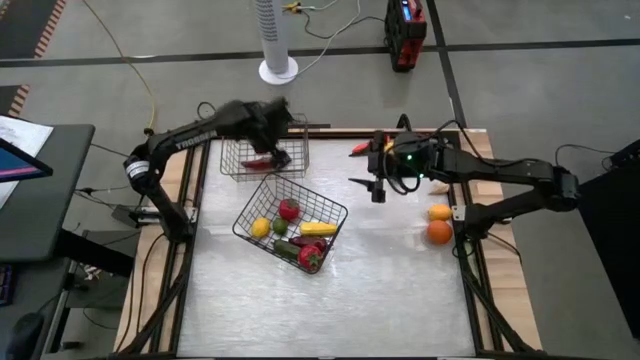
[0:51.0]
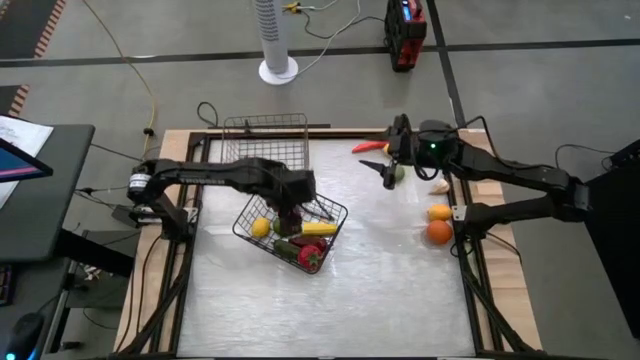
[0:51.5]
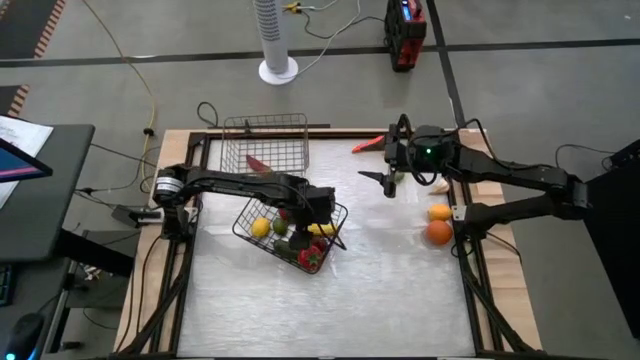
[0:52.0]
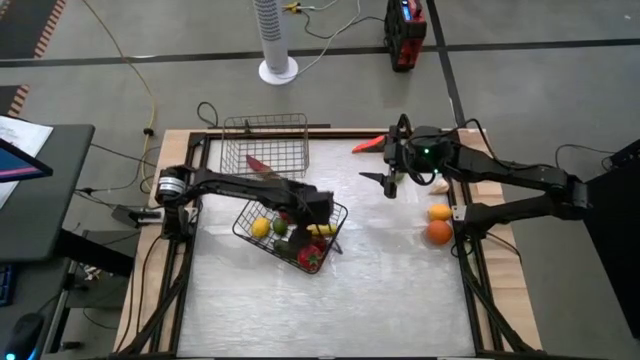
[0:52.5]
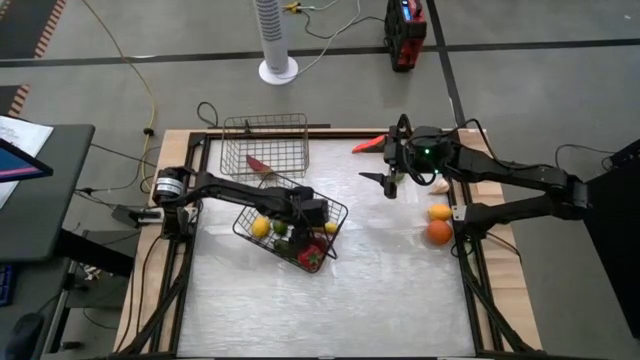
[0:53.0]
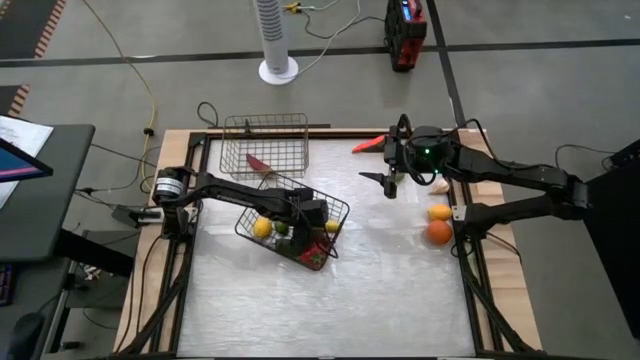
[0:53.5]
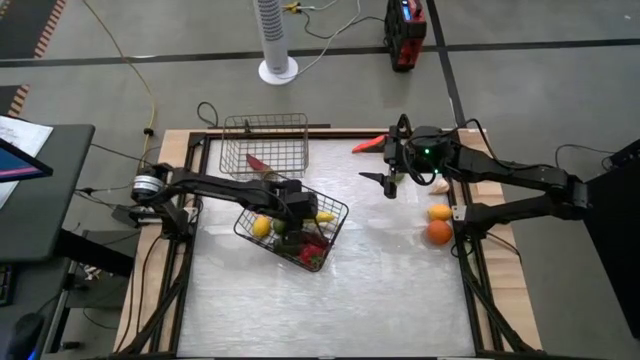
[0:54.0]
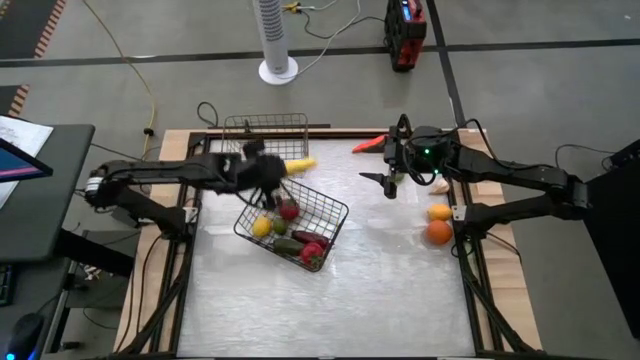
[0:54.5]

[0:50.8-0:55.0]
Task: Sort produce into baskets
Put the yellow corn into the top wire basket

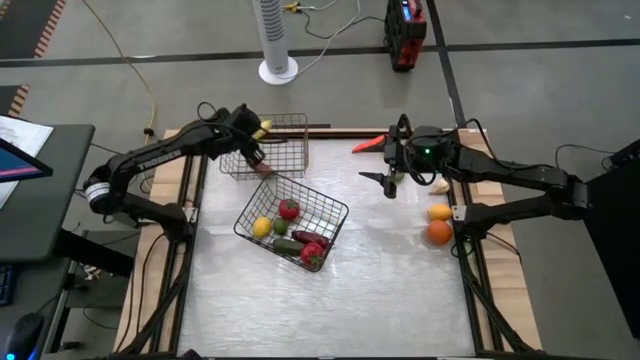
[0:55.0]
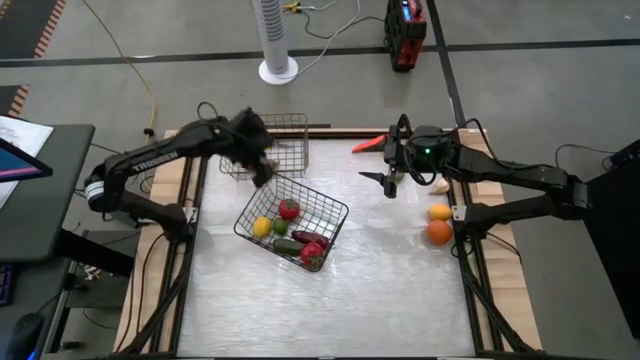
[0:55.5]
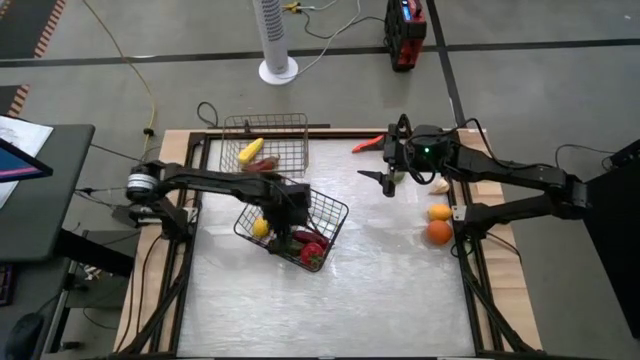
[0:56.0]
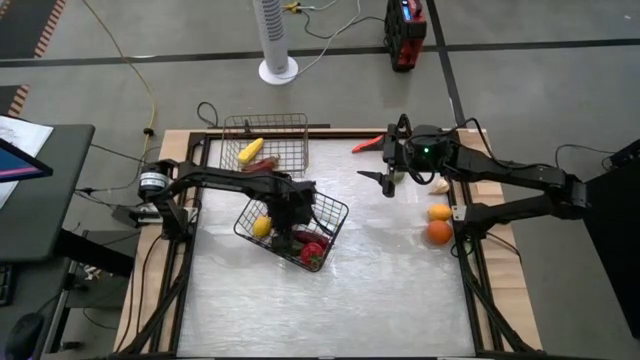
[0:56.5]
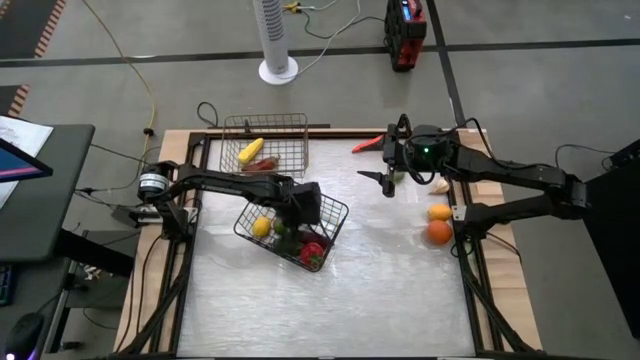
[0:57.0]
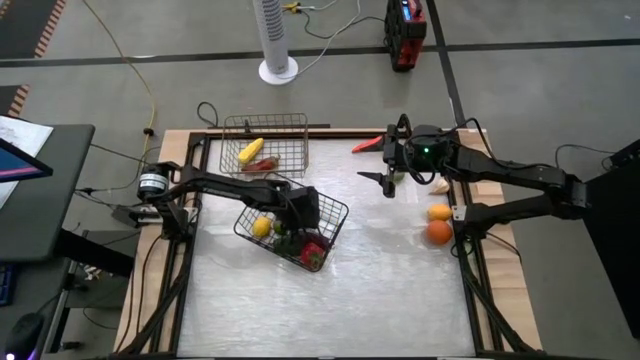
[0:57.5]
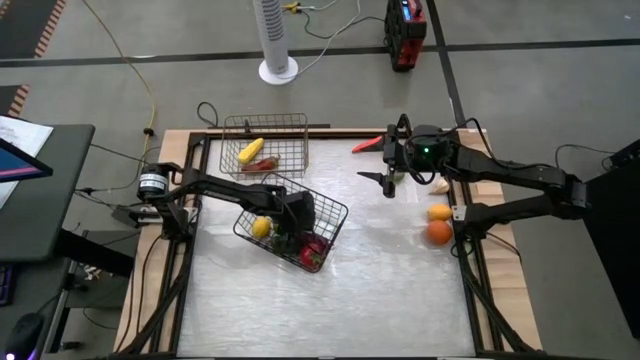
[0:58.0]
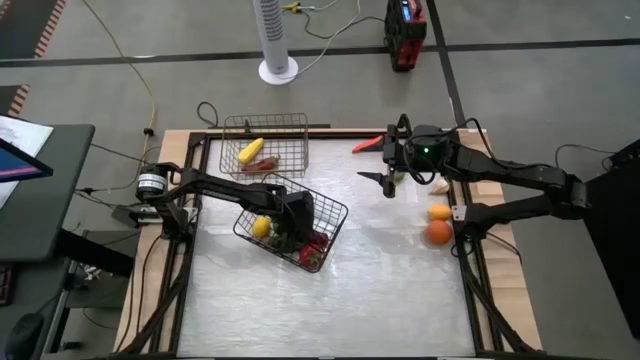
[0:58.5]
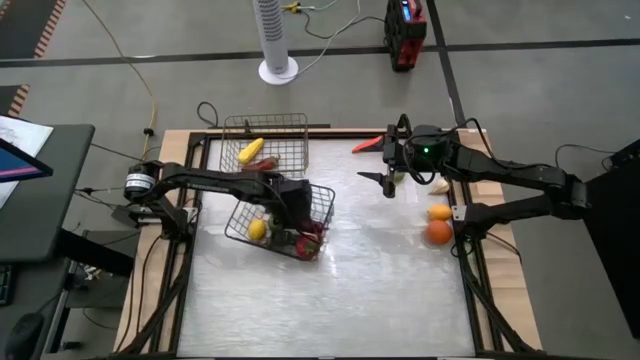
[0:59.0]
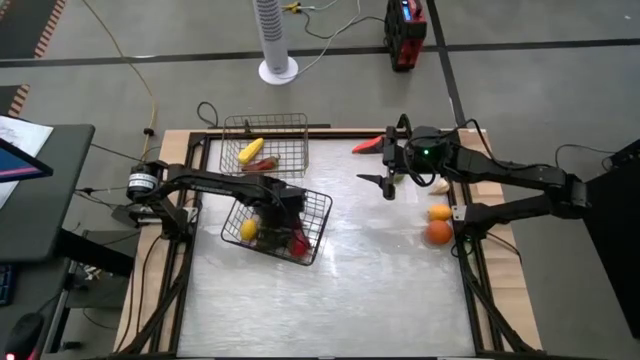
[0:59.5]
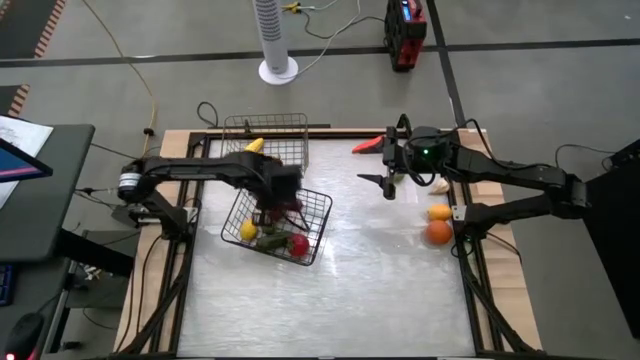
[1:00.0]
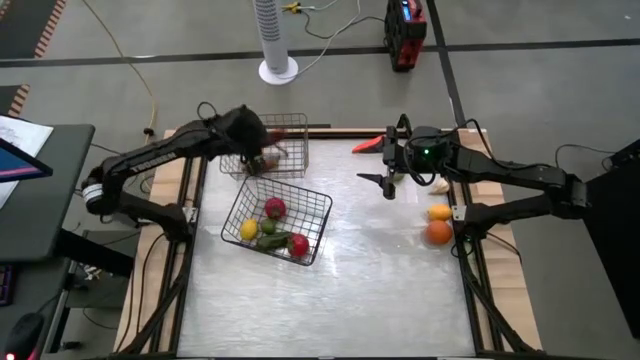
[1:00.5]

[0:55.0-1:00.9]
Put the red chili pepper into the top wire basket

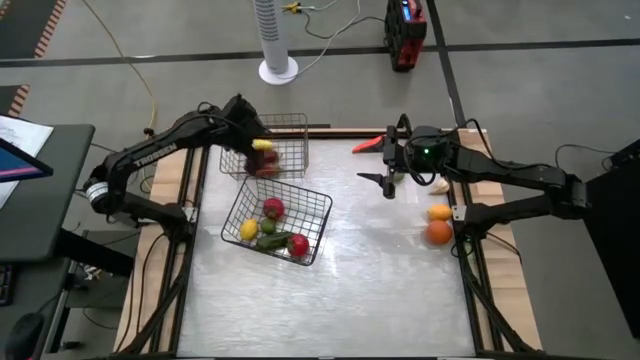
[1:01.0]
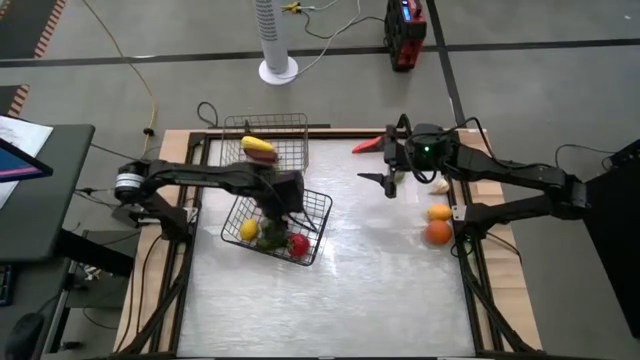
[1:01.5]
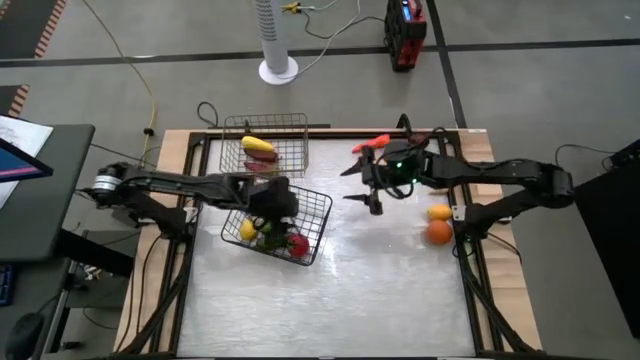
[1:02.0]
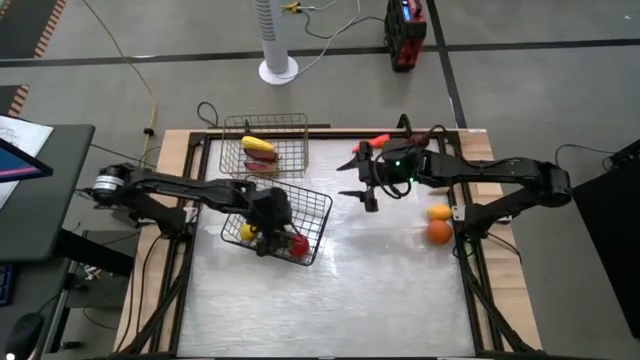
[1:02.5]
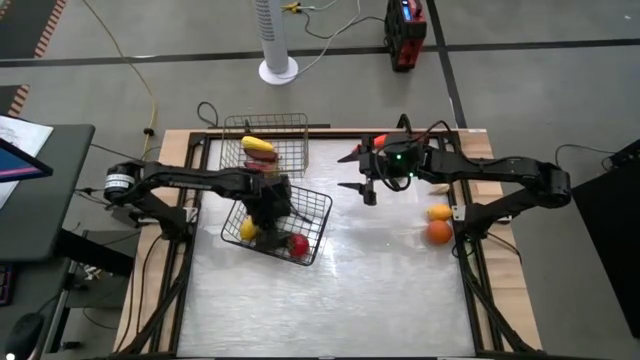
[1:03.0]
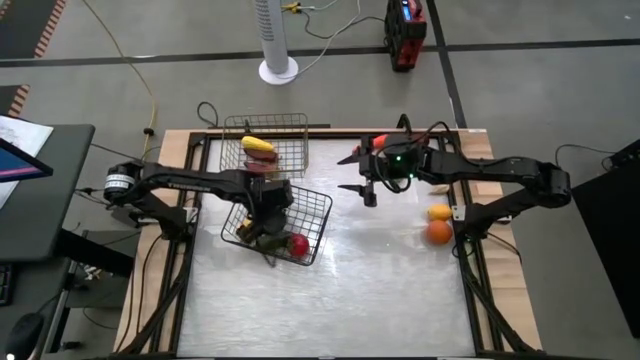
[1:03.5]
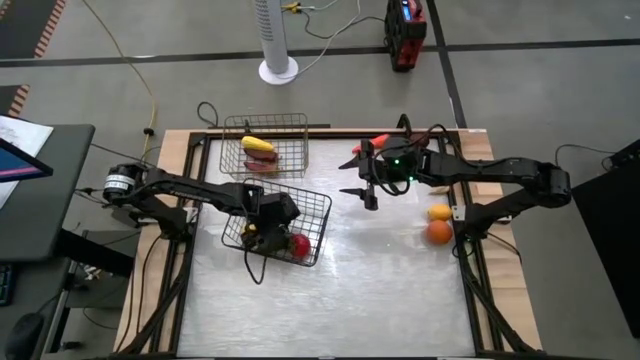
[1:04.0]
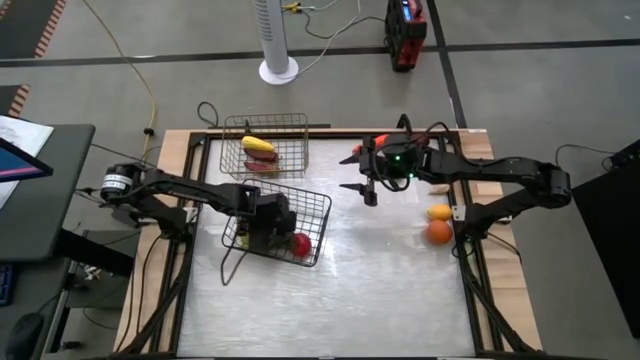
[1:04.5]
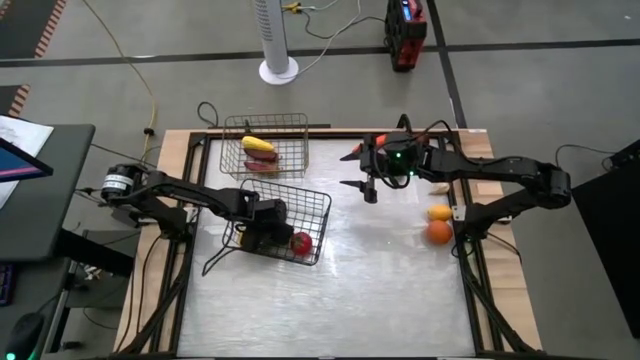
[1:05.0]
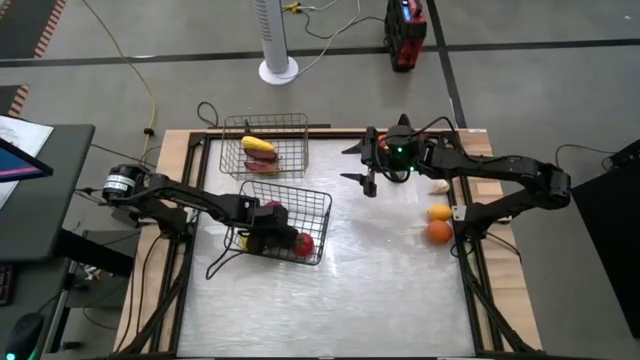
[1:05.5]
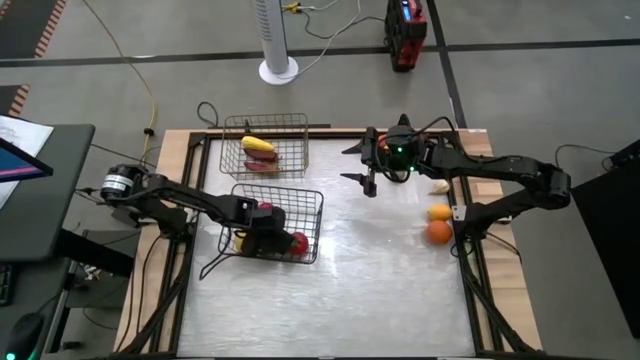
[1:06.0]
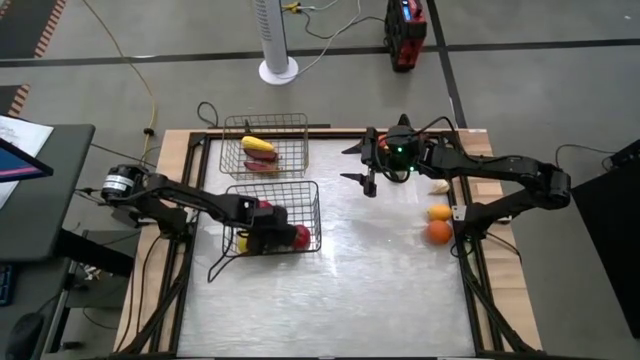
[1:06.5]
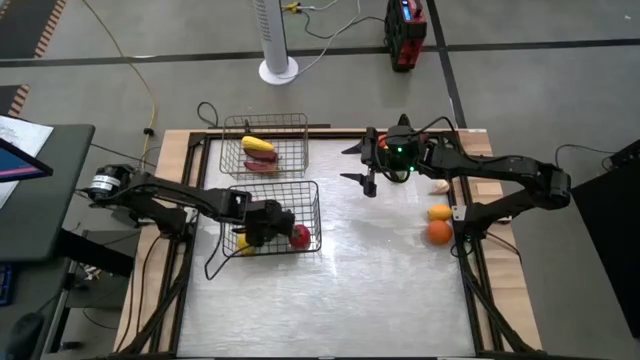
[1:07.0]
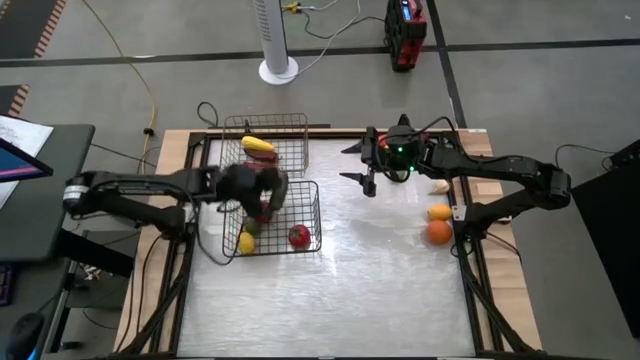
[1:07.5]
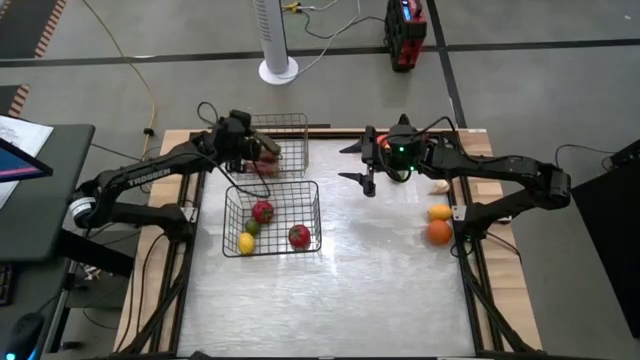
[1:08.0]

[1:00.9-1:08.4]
Put the green chili pepper into the top wire basket

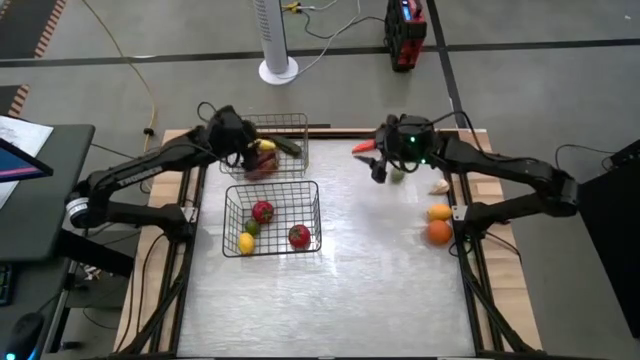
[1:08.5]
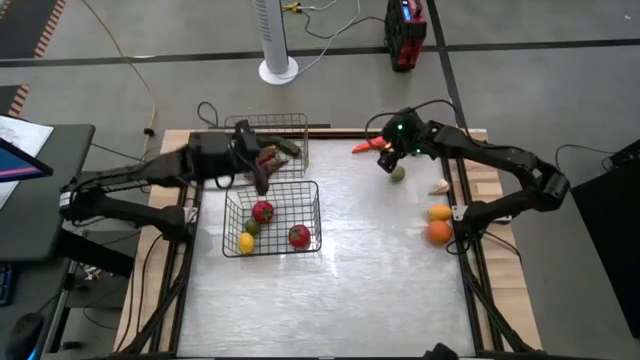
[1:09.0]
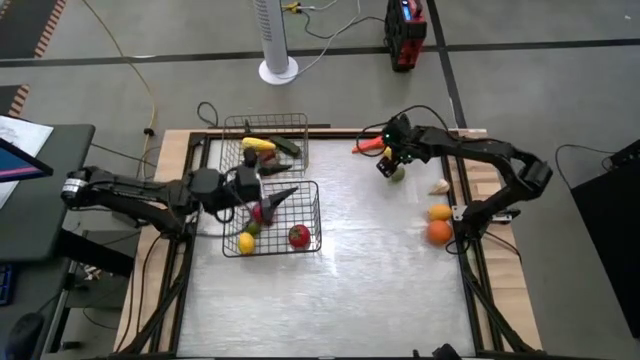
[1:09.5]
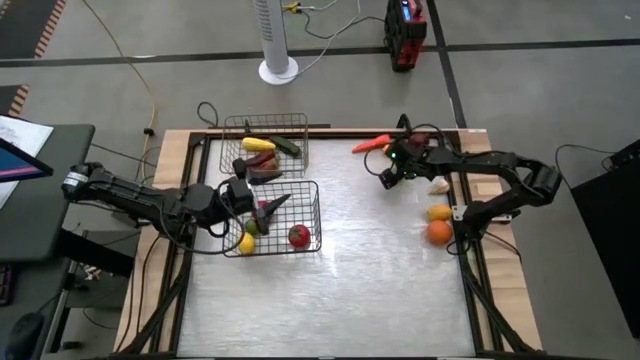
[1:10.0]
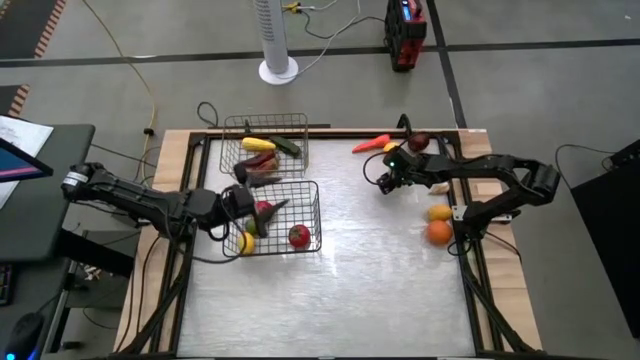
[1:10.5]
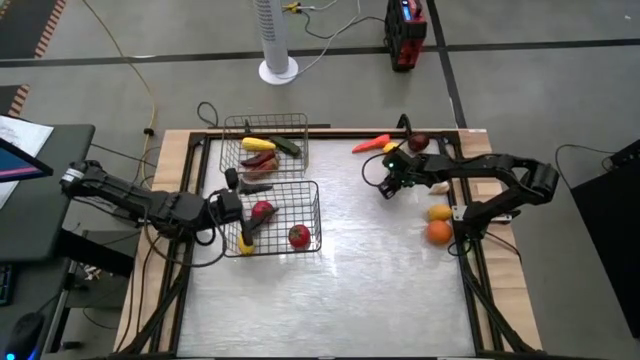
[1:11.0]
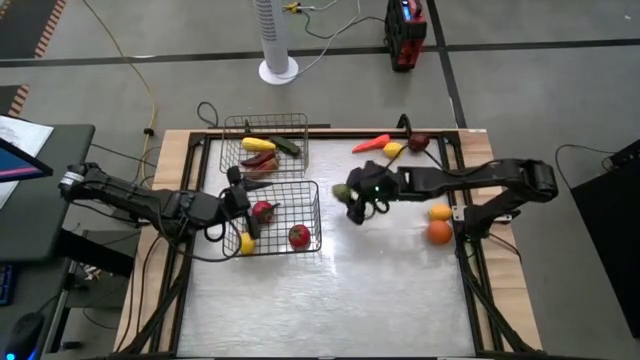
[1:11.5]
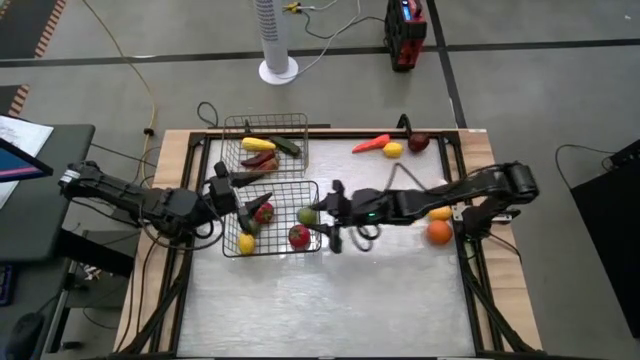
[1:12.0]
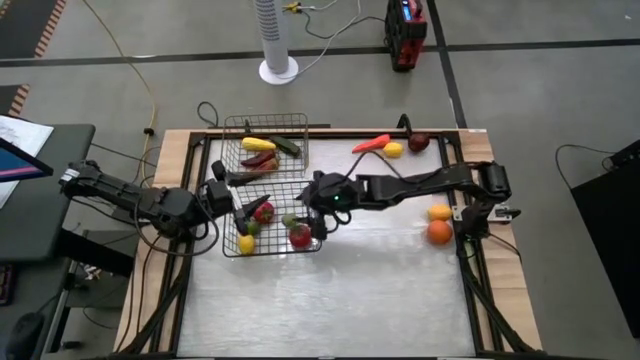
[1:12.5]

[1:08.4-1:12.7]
Put the green lime into the bottom wire basket
